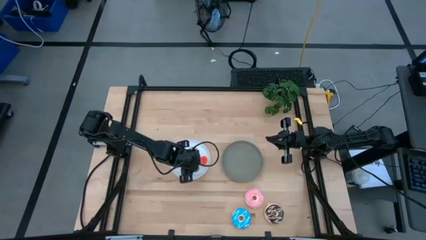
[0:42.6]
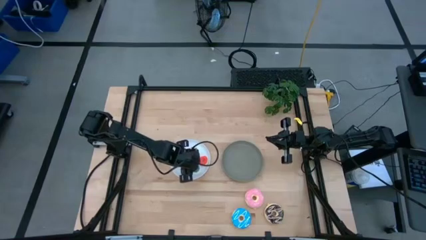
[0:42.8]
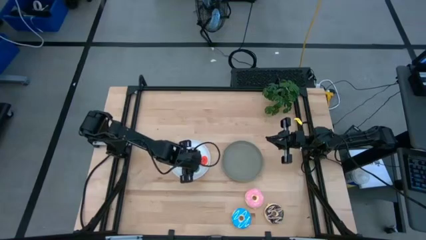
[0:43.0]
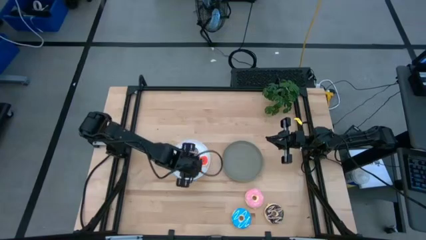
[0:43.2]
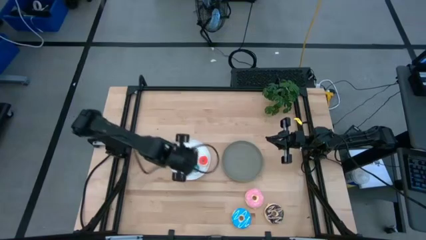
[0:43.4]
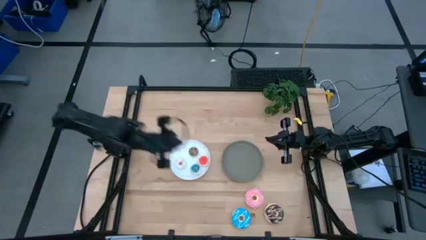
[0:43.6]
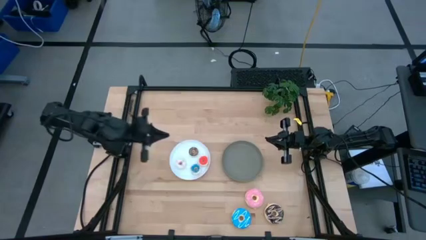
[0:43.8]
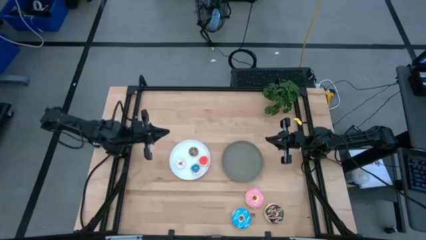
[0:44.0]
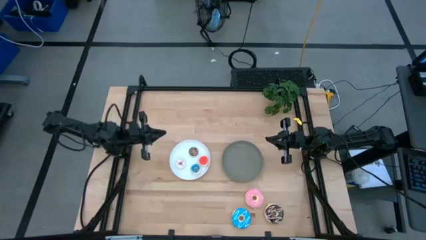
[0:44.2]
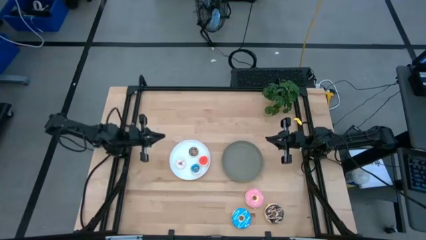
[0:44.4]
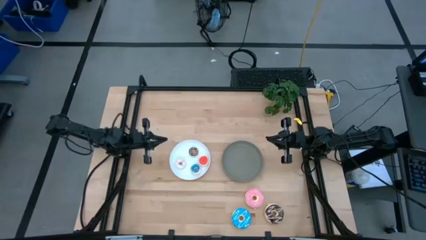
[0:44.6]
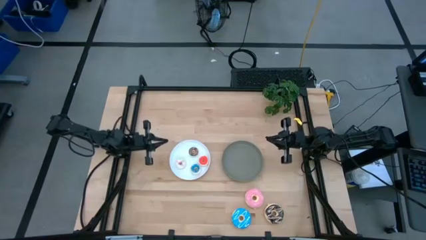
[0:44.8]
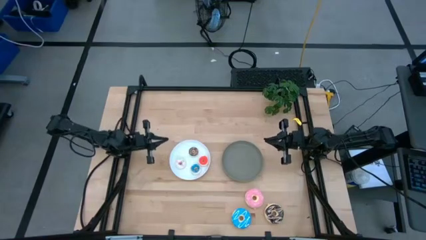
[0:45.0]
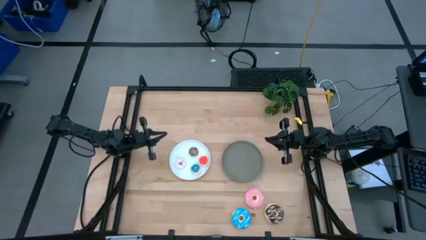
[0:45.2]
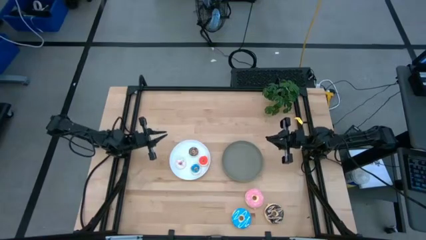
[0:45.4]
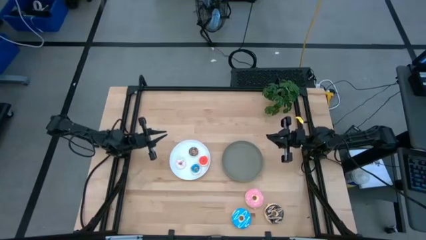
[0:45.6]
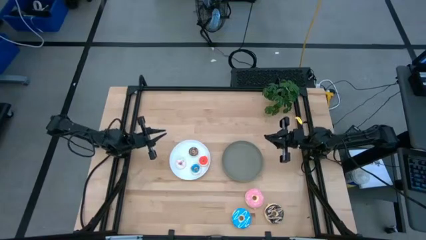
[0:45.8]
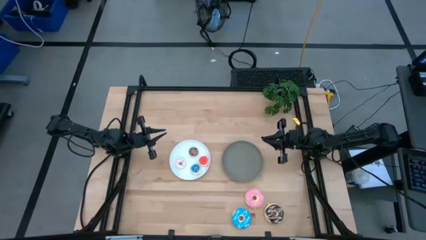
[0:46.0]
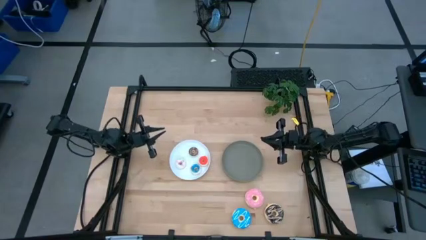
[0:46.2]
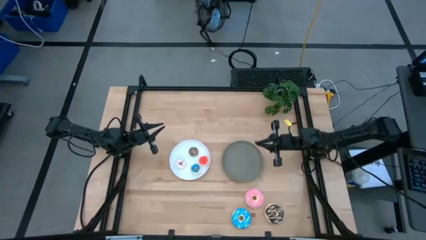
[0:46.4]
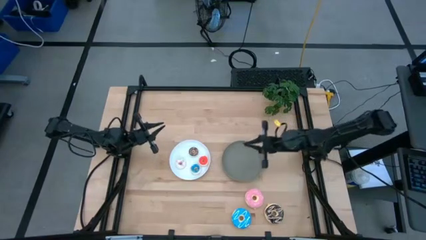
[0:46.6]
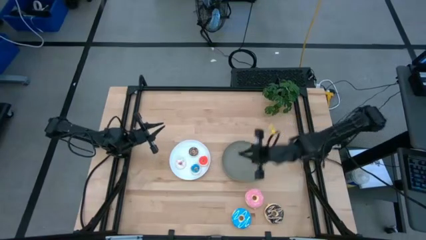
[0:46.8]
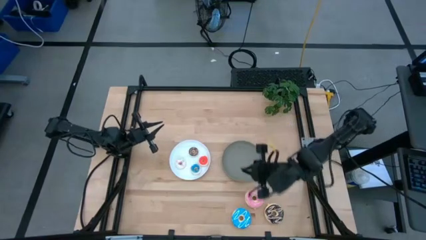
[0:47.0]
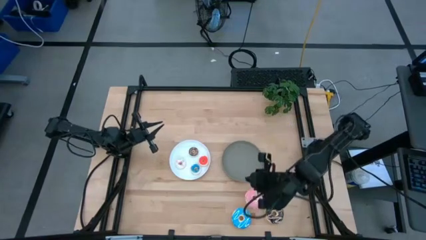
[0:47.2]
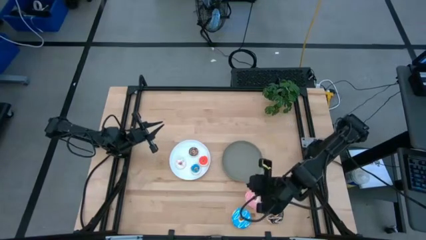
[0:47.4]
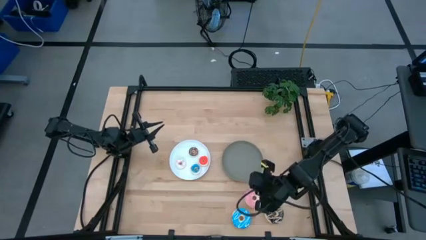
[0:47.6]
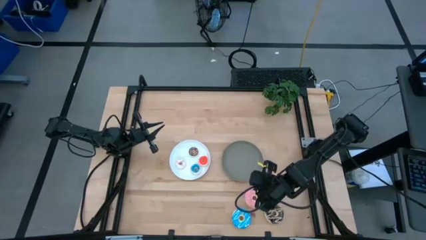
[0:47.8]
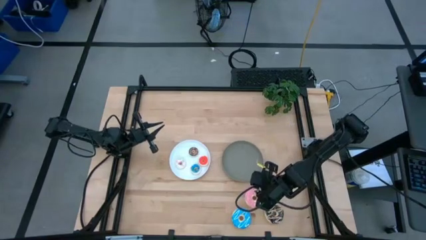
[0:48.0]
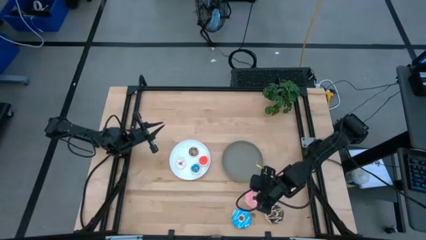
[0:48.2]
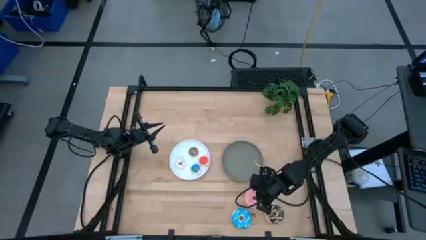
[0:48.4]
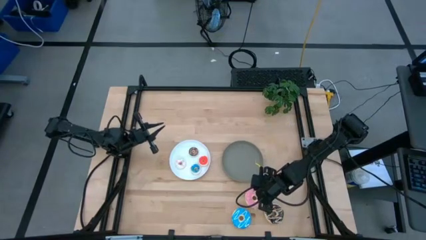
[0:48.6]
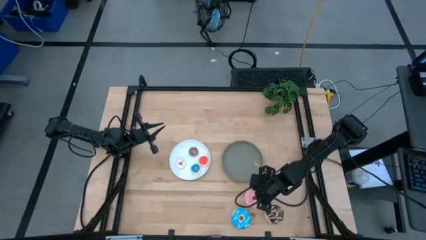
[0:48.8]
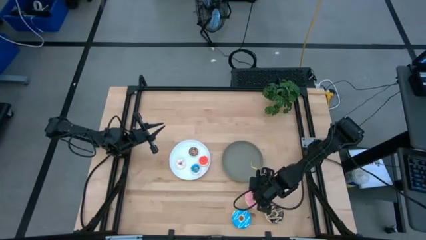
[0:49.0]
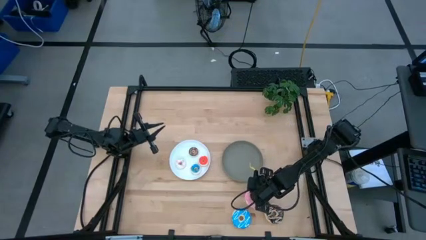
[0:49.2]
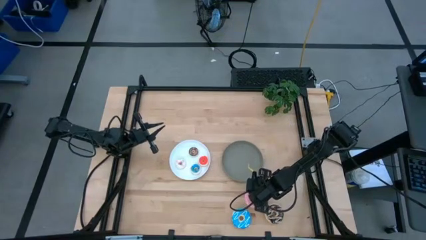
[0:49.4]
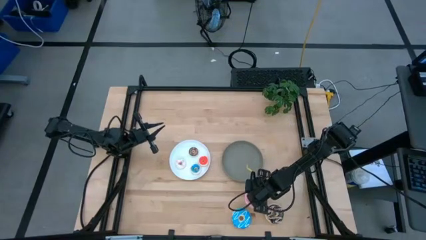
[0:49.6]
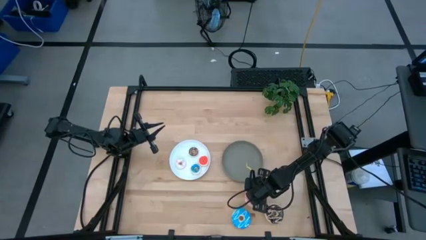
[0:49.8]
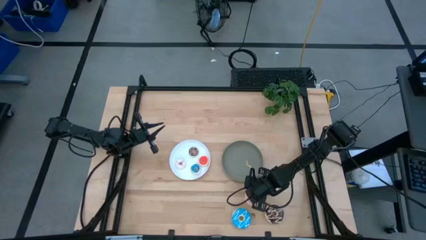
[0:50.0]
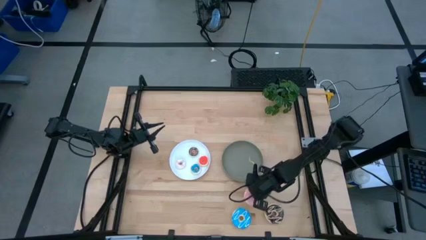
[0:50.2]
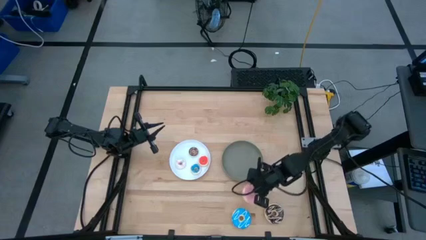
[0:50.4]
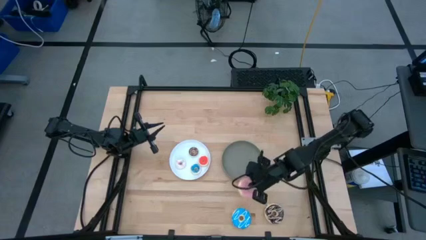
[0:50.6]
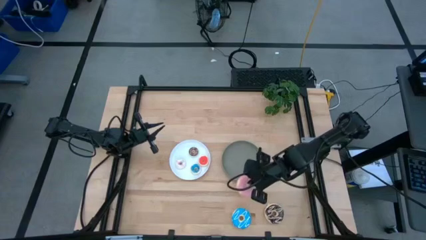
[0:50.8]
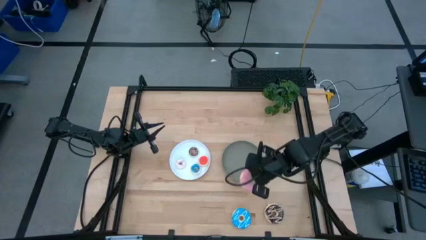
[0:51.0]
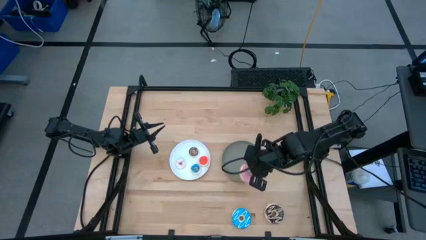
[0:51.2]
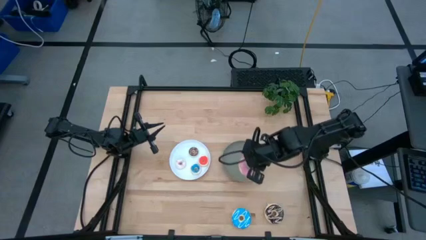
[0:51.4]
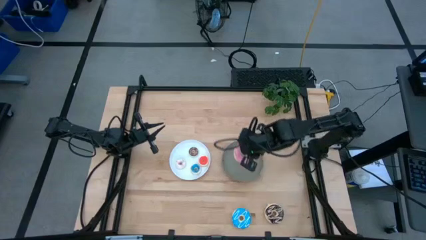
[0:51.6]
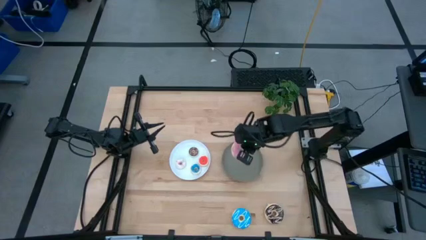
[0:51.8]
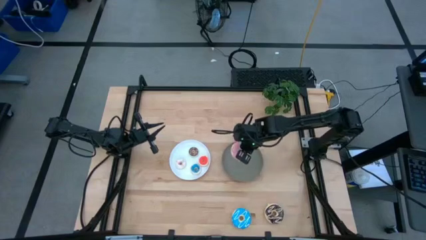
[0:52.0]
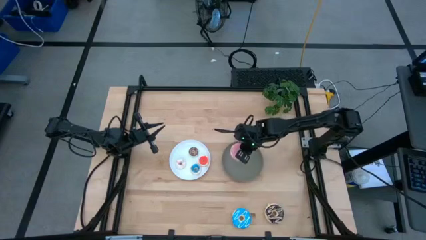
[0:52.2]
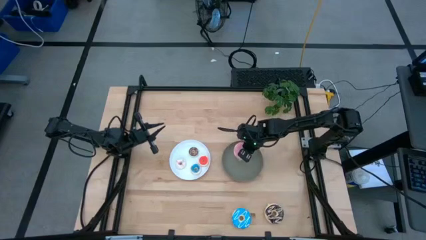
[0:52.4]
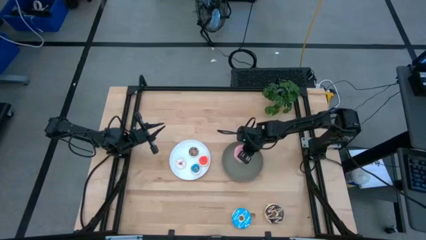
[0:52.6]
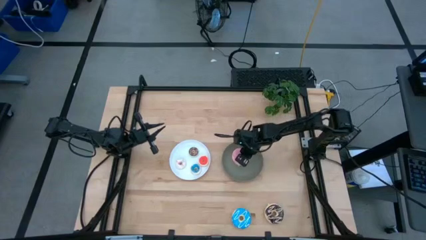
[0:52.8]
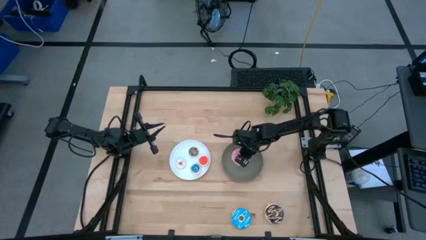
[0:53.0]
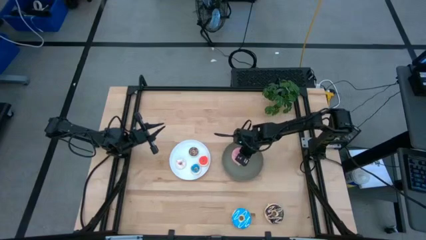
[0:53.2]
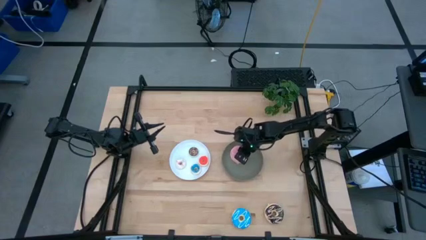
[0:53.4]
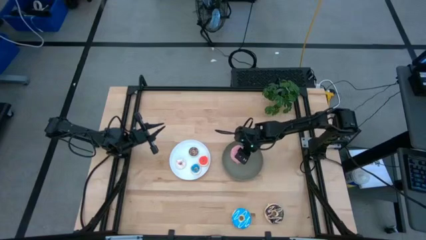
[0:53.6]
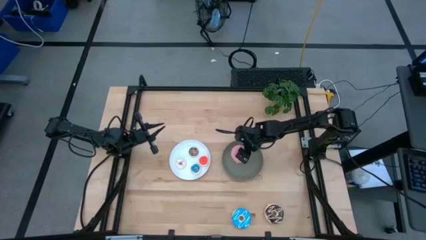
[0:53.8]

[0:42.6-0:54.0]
Task: Pick & Place donuts
Put the big pink doughnut on the gray plate
